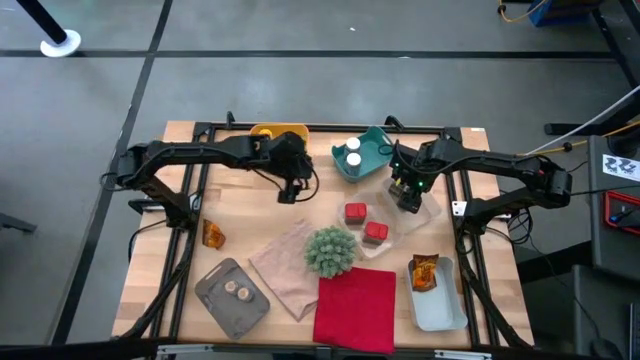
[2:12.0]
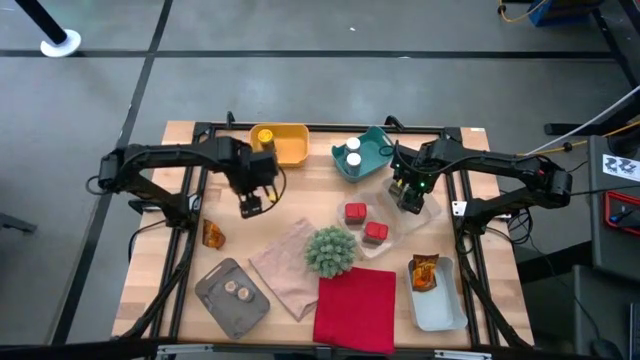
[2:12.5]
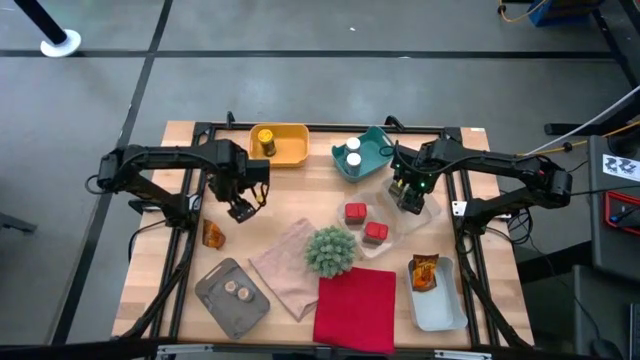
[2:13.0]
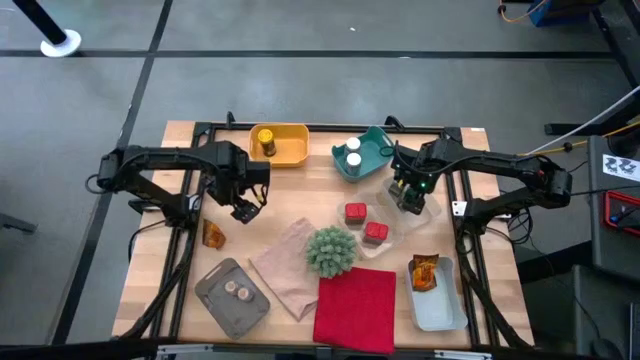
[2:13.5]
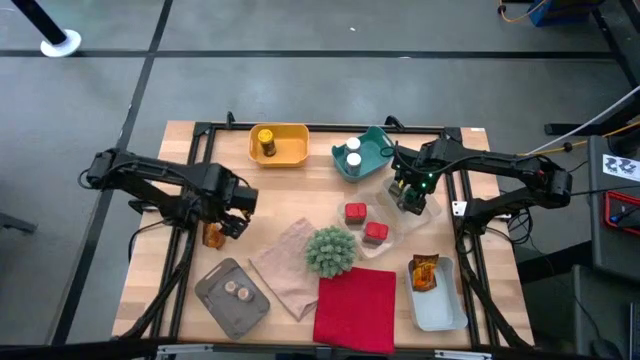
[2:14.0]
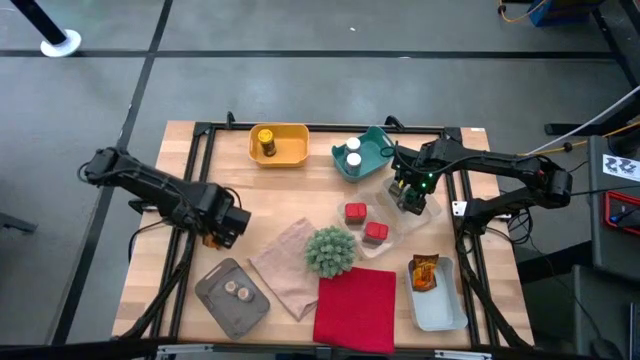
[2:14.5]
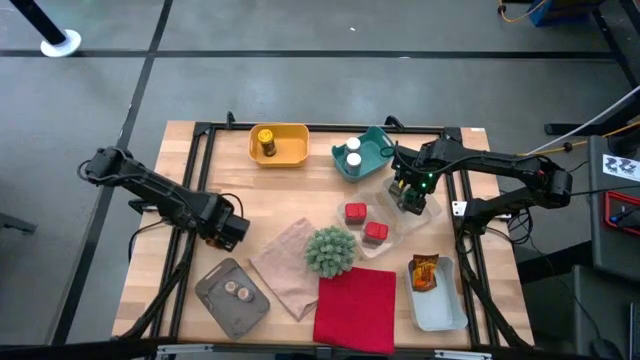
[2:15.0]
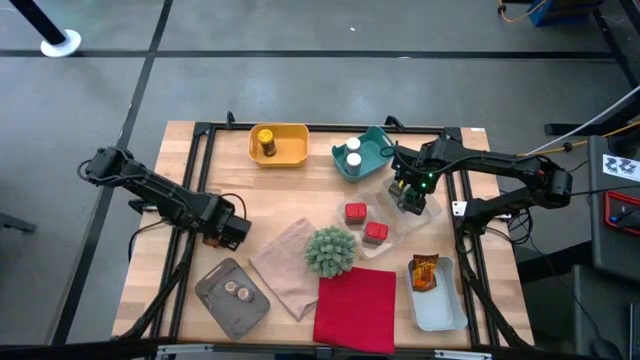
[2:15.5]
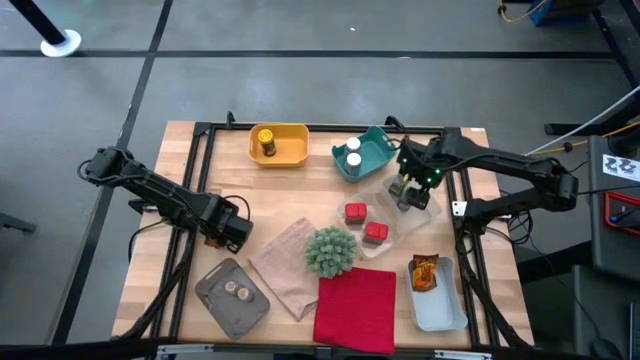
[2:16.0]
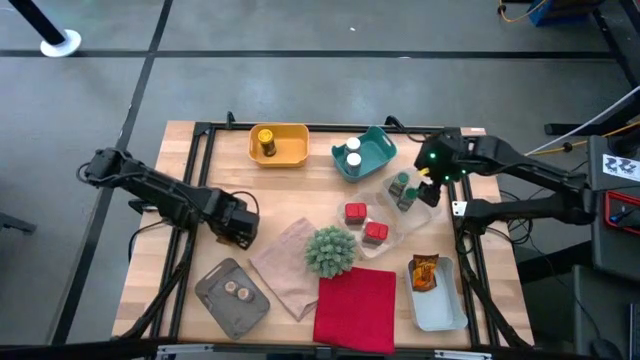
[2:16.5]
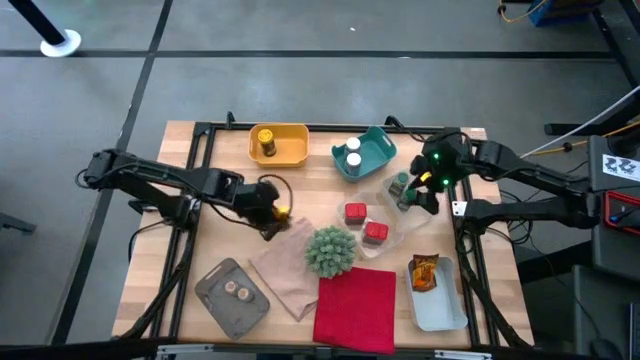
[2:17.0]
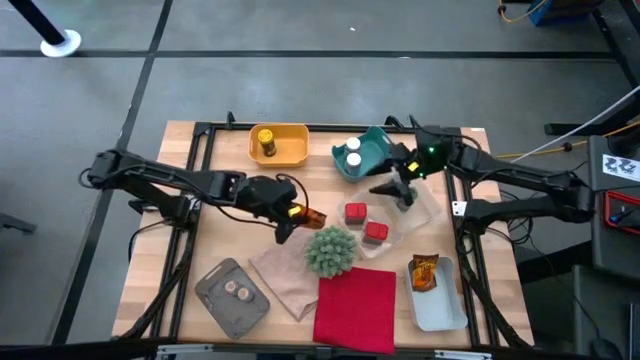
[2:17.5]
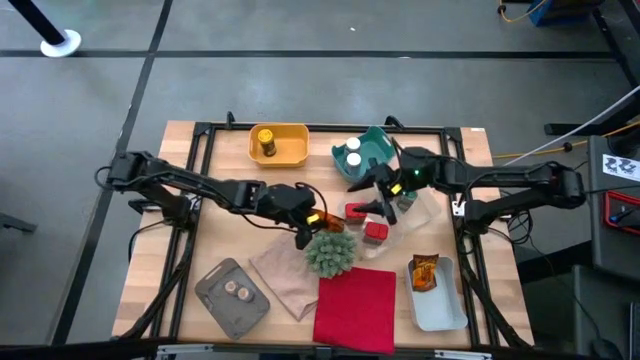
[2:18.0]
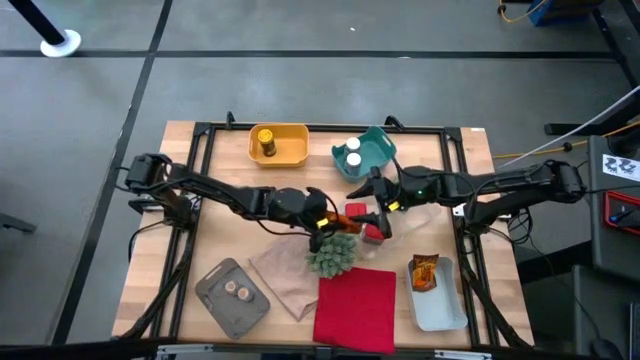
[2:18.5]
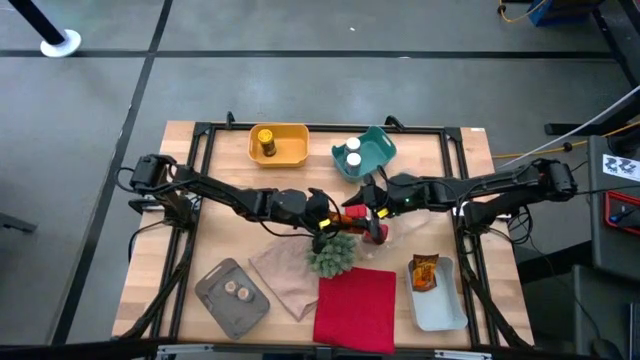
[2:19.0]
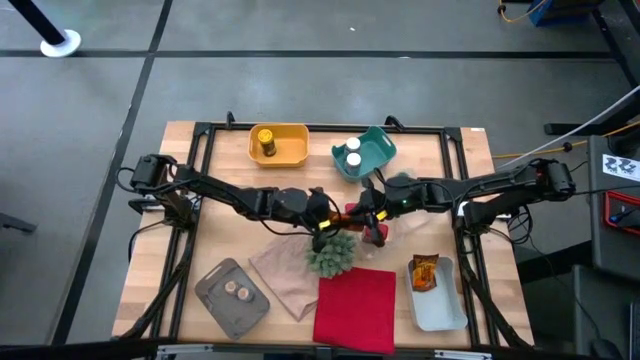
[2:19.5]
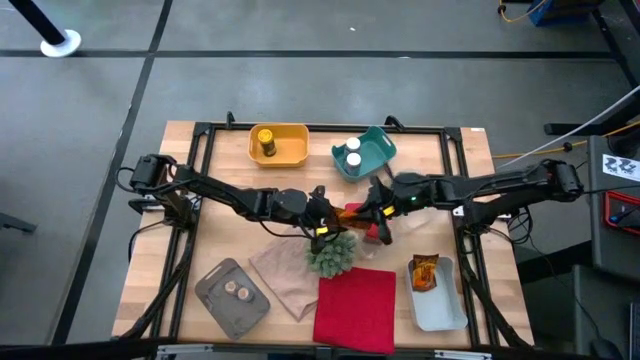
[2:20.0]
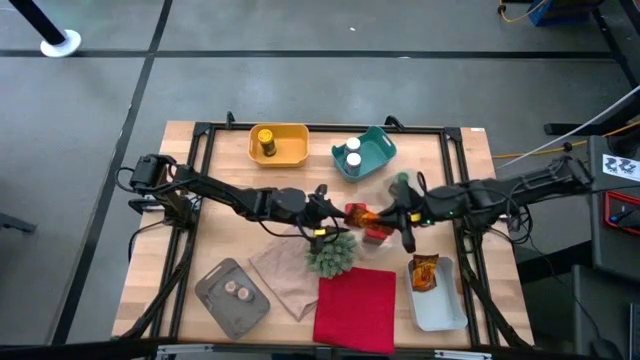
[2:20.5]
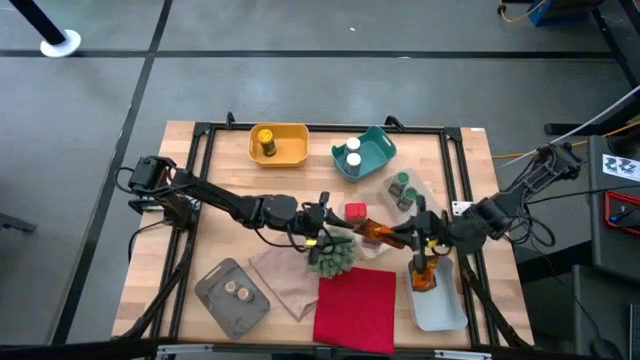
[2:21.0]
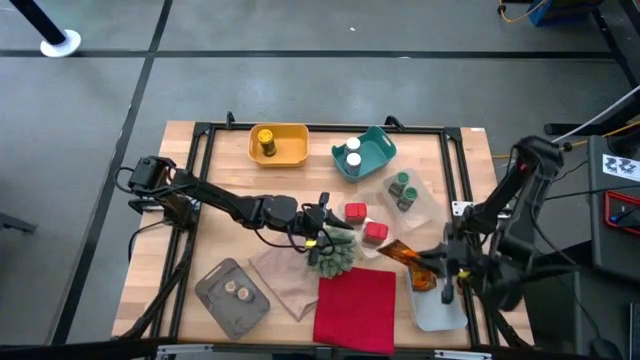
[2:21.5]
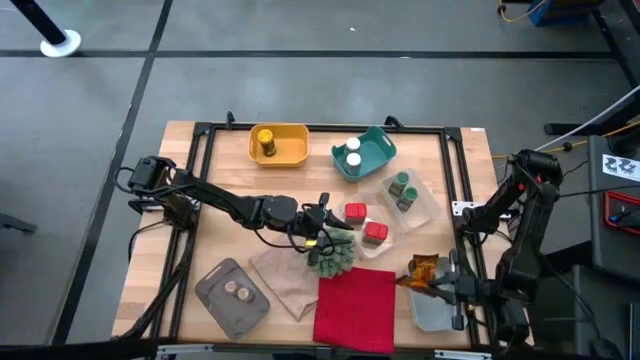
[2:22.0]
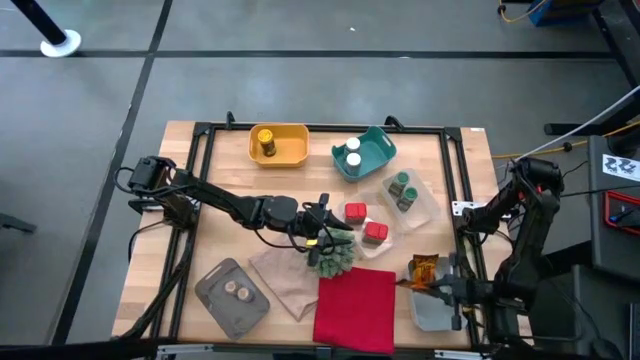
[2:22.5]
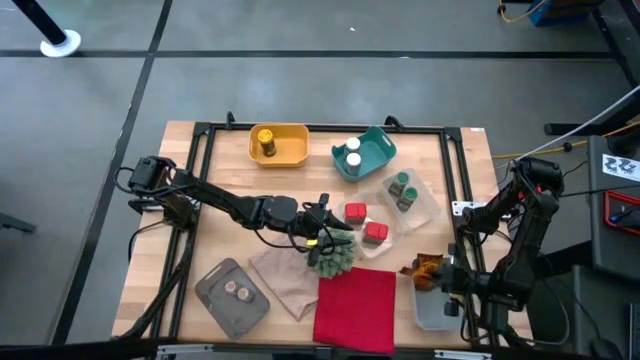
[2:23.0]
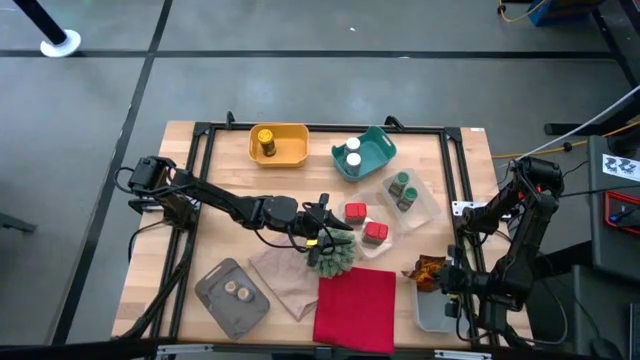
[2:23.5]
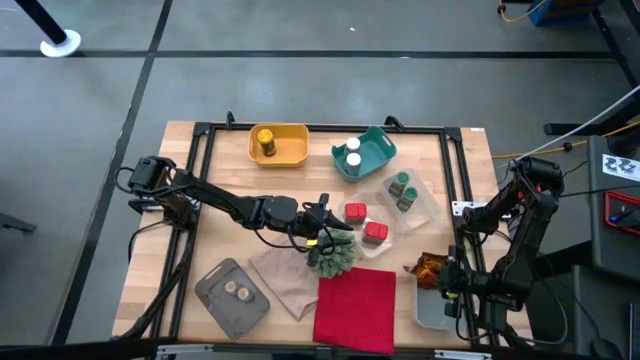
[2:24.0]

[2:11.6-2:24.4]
Task: Sort spices by type
Put the orange seasoning pack into the gray bin

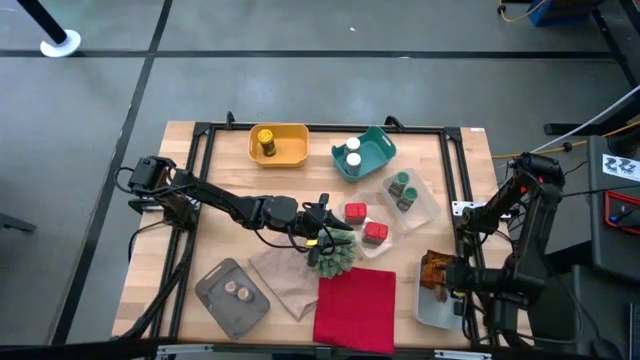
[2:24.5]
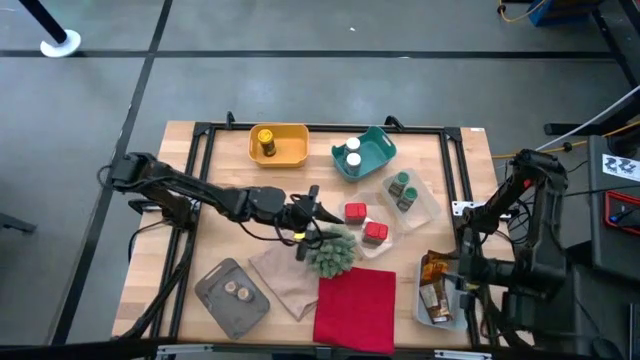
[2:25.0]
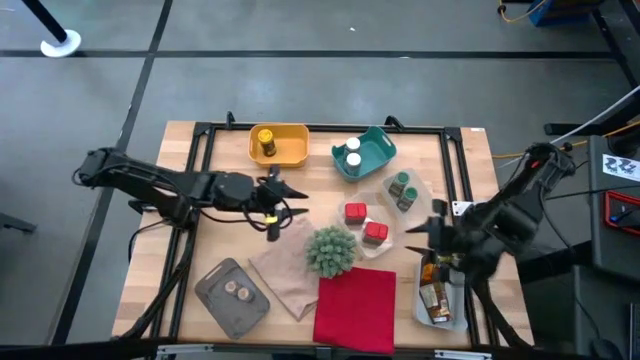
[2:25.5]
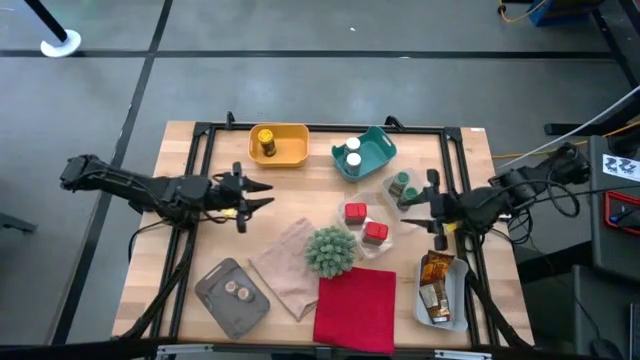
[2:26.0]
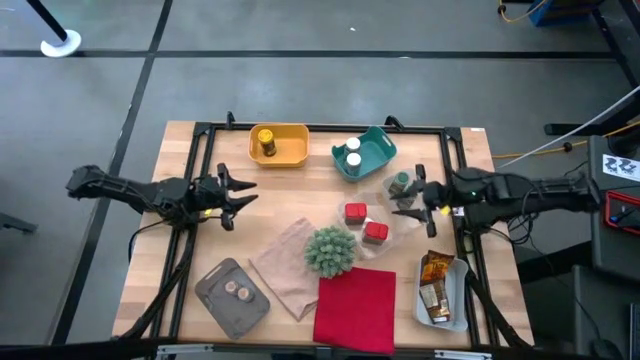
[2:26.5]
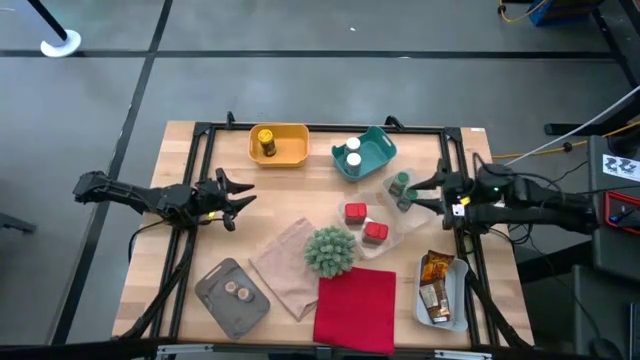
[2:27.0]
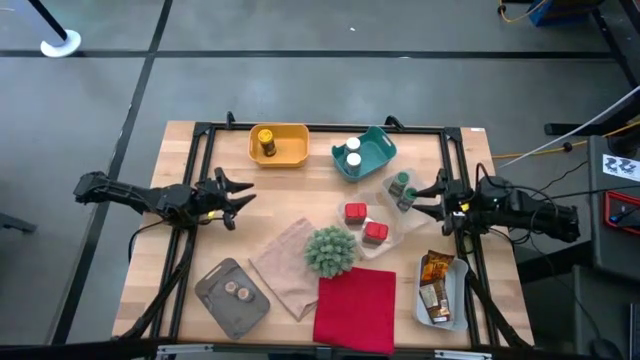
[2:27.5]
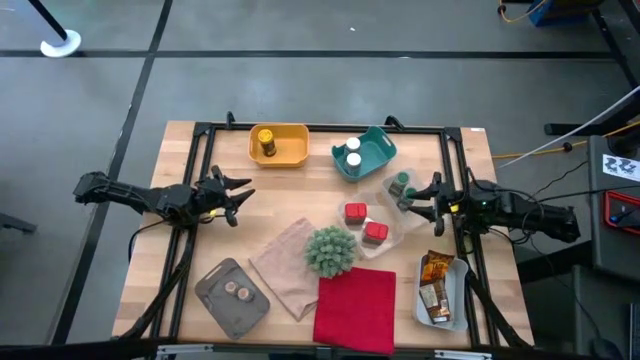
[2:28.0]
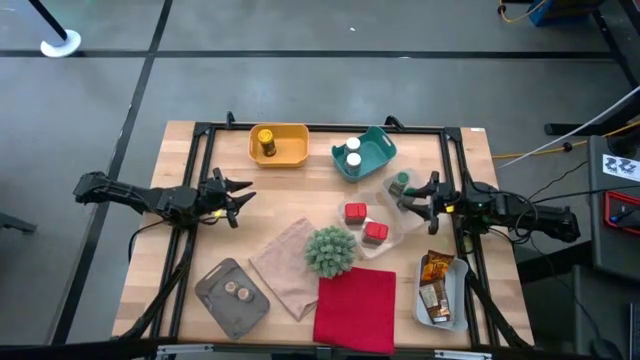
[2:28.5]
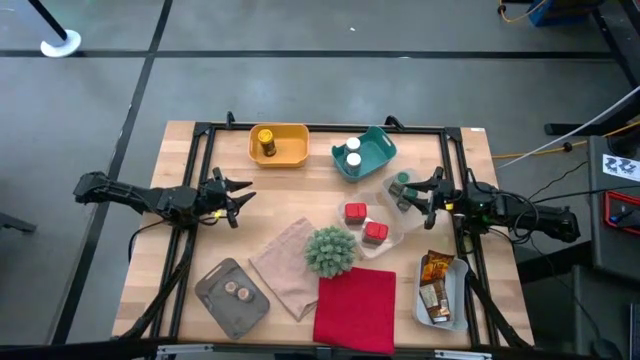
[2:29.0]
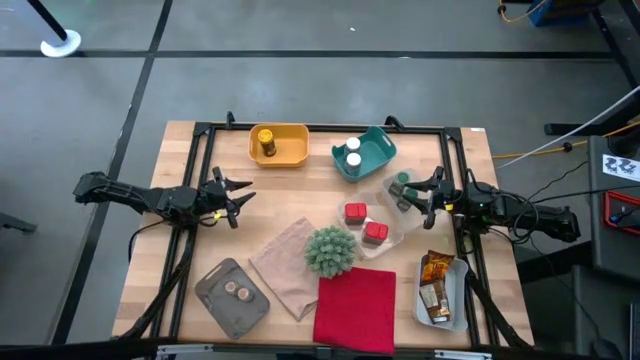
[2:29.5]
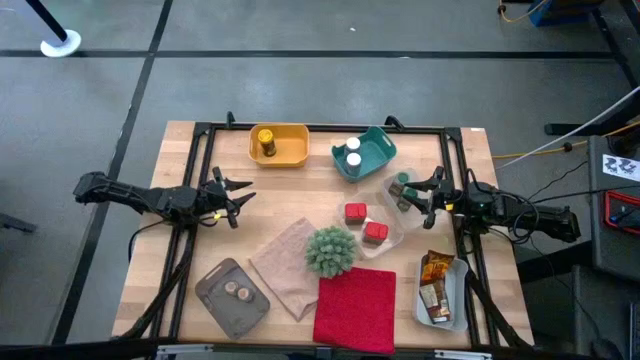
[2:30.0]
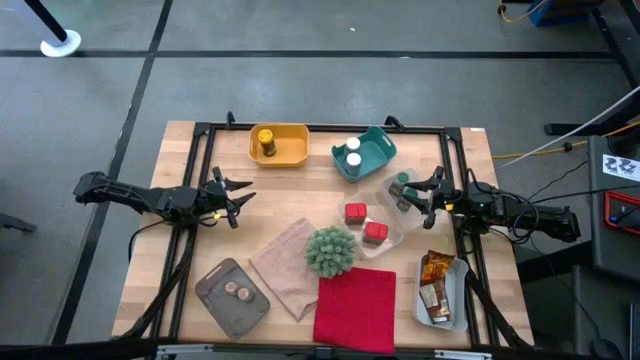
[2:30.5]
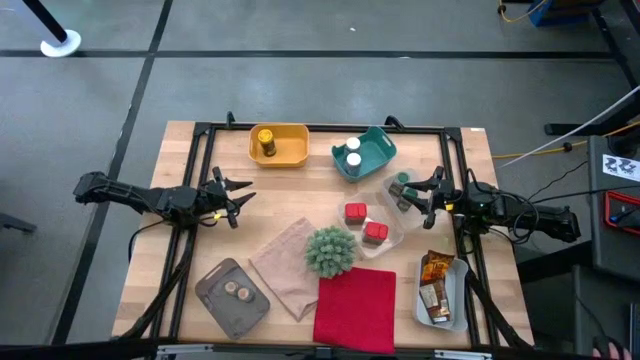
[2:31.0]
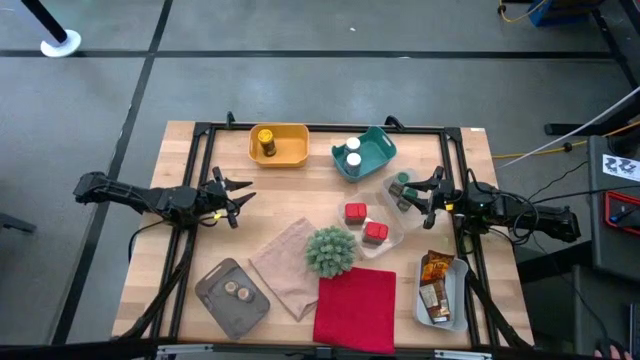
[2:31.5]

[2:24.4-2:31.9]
Return to Home Position

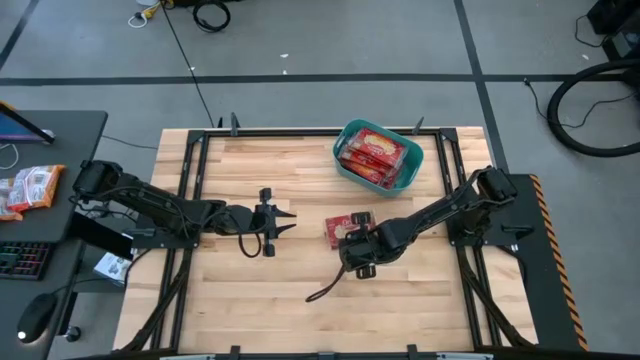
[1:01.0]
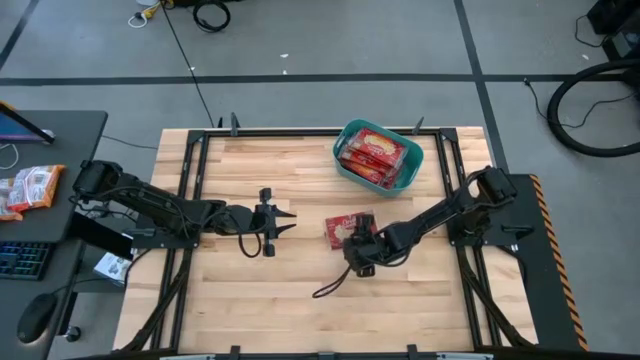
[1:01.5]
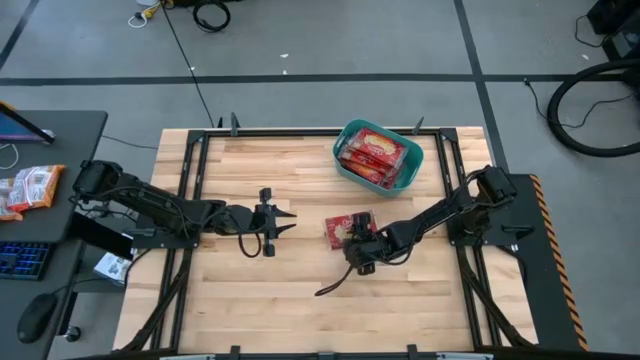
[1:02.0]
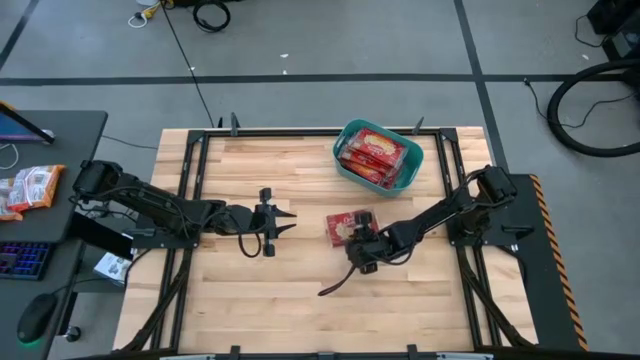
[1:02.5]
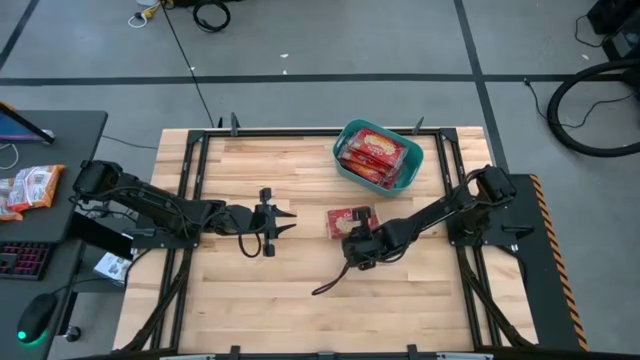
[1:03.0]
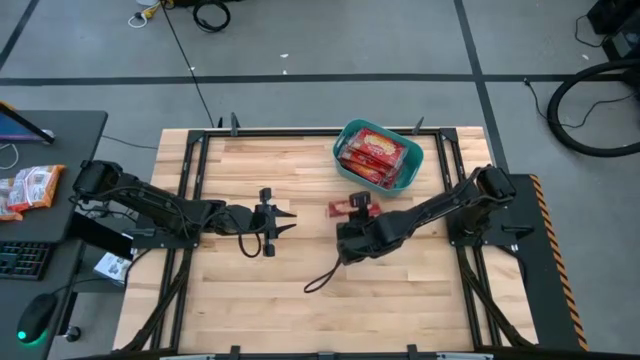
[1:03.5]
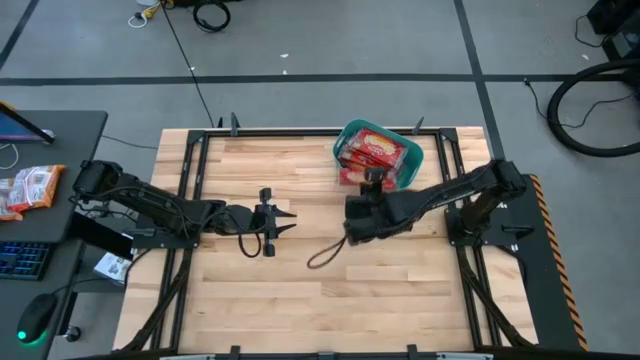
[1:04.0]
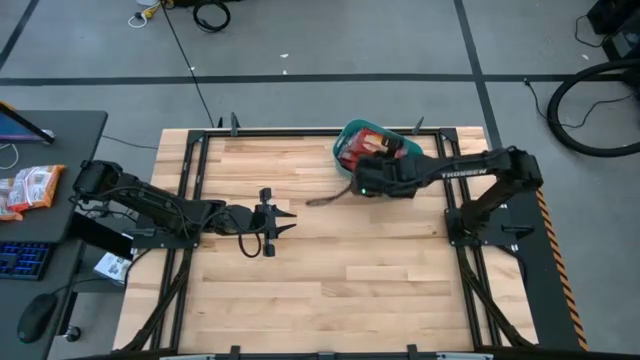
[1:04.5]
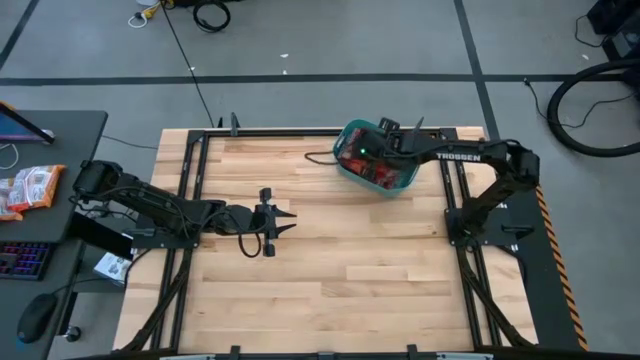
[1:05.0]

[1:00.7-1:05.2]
Task: Sort popcorn bags into baskets
Put the popcorn bag into the bin
